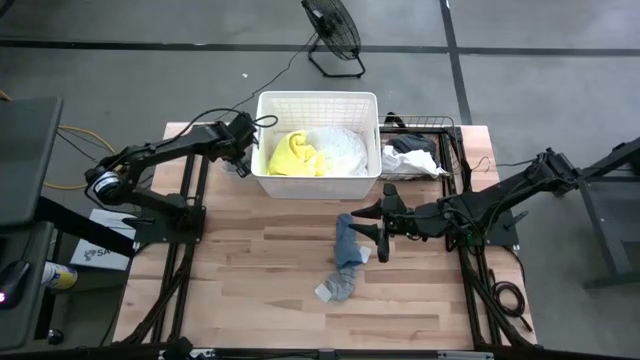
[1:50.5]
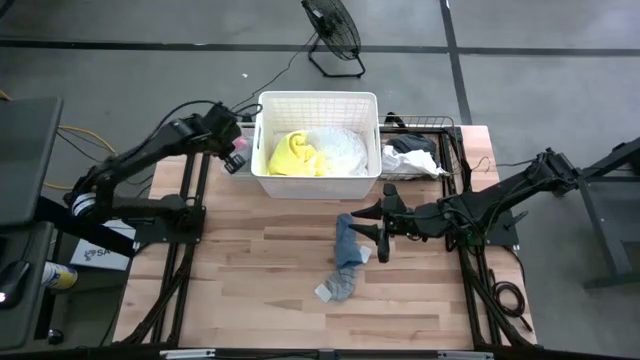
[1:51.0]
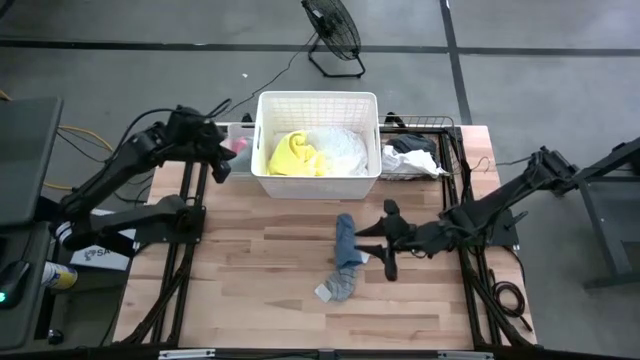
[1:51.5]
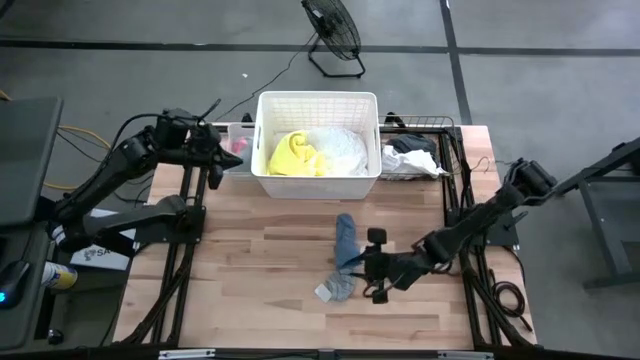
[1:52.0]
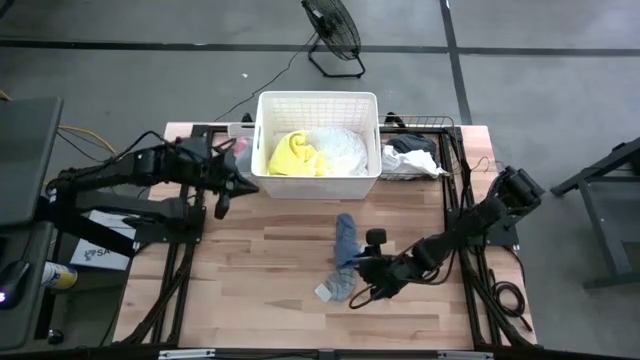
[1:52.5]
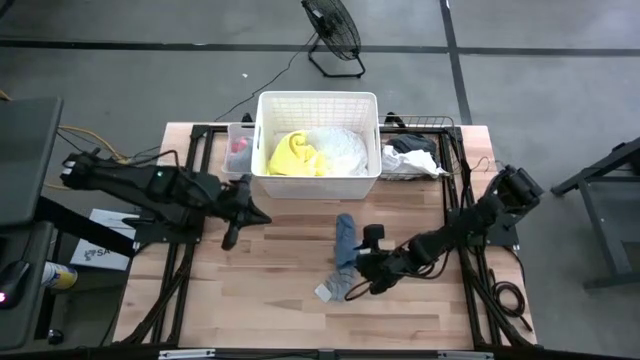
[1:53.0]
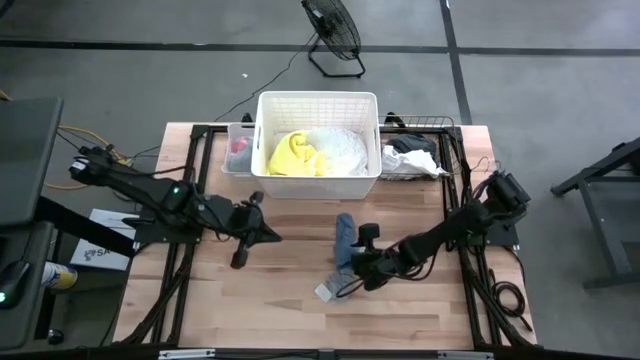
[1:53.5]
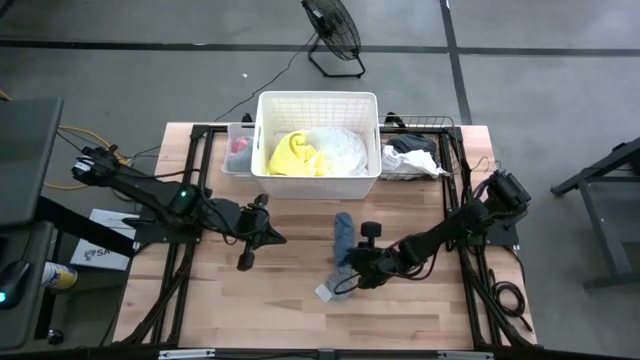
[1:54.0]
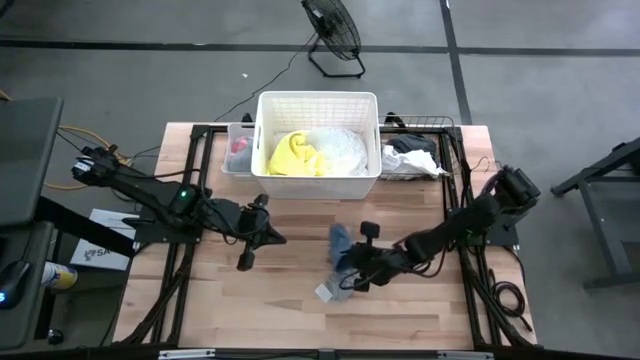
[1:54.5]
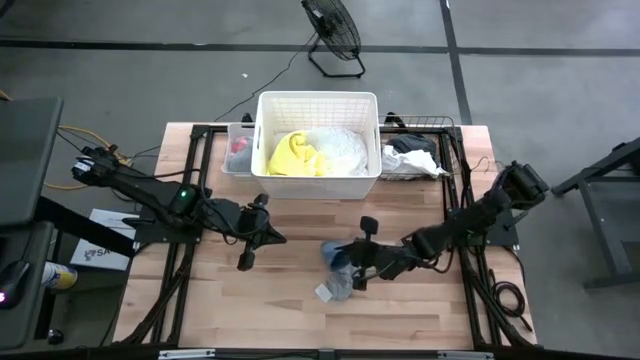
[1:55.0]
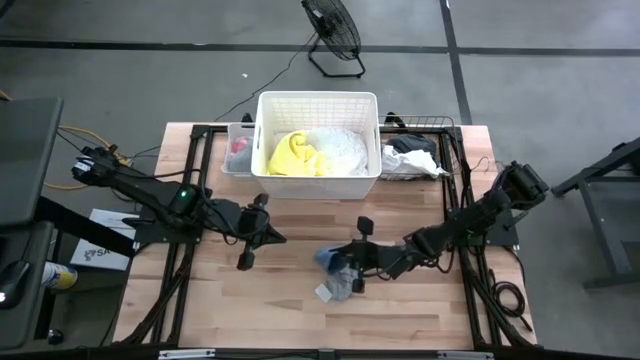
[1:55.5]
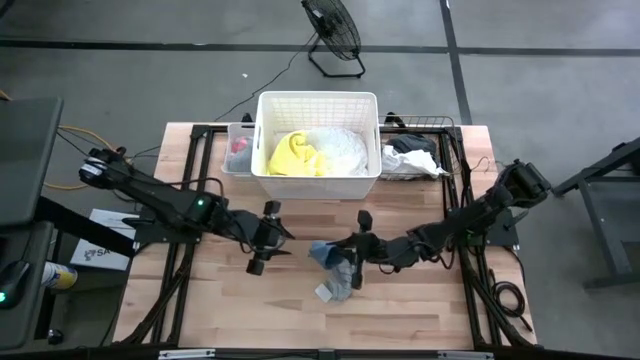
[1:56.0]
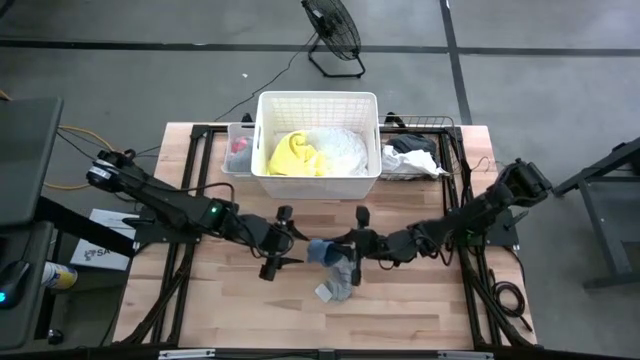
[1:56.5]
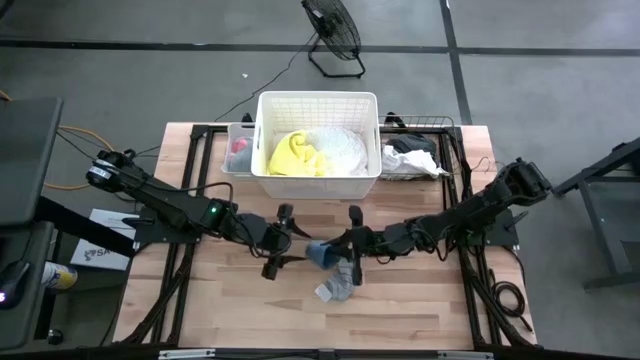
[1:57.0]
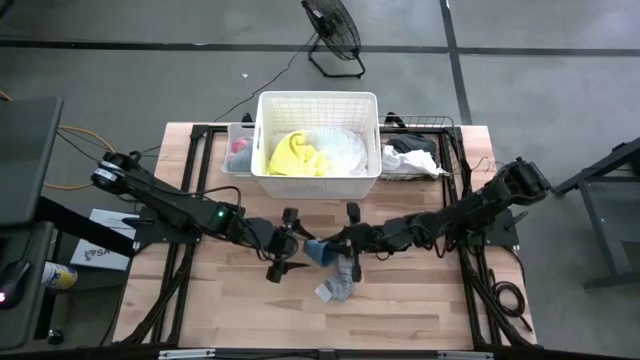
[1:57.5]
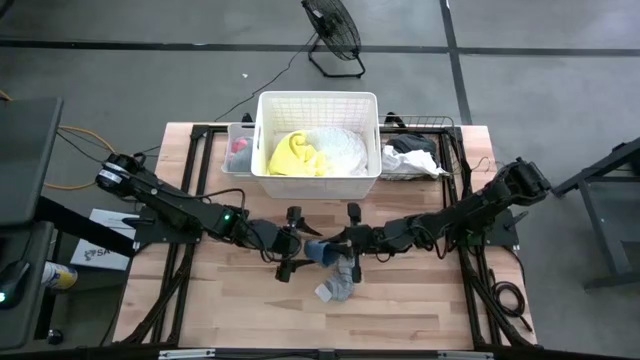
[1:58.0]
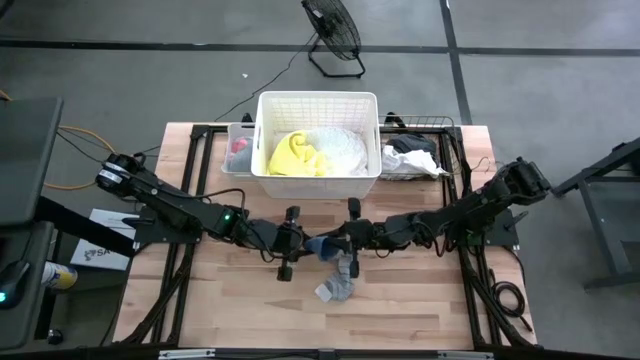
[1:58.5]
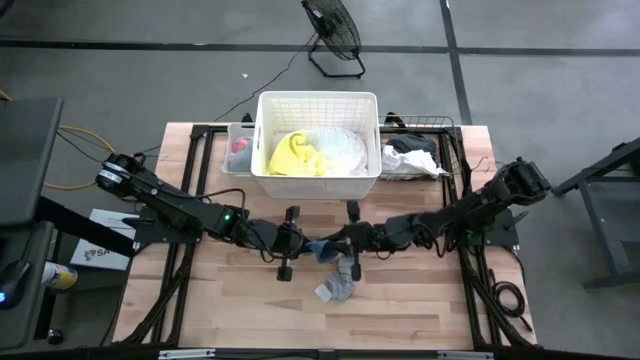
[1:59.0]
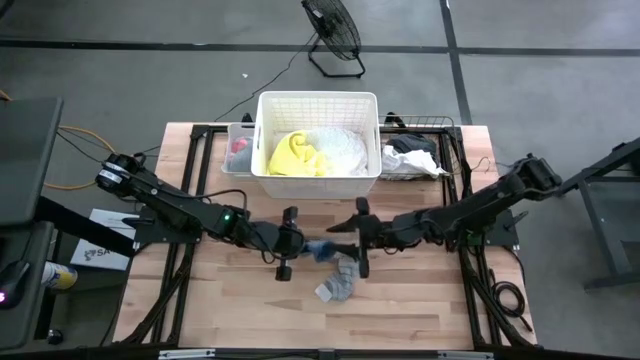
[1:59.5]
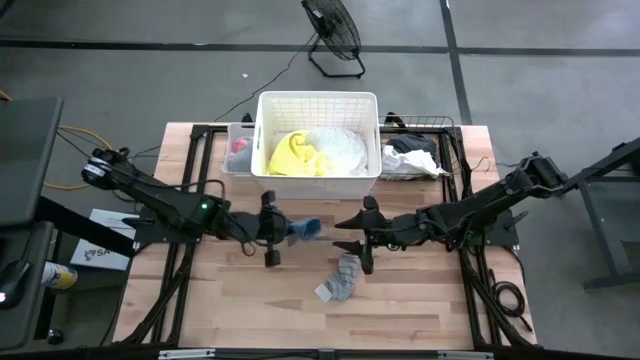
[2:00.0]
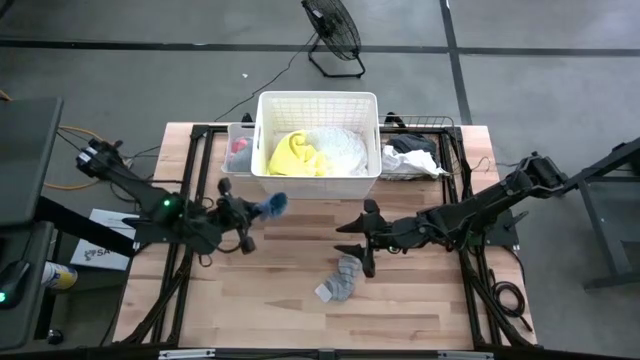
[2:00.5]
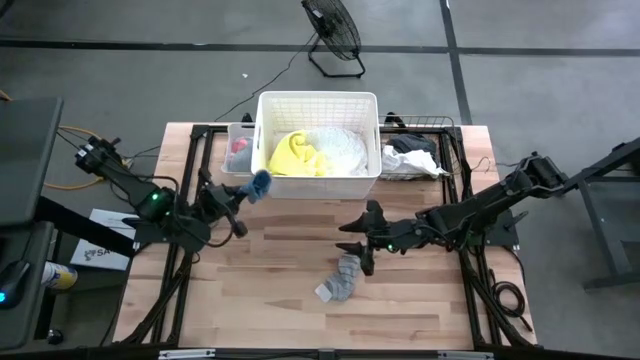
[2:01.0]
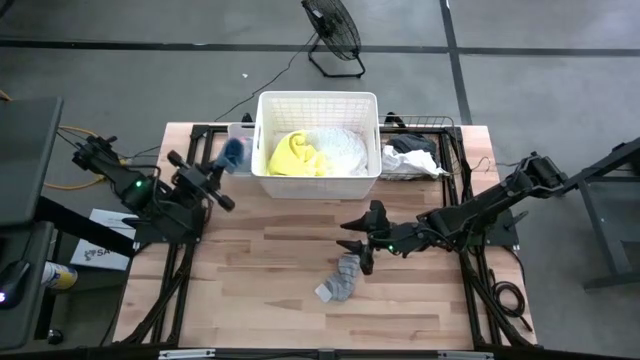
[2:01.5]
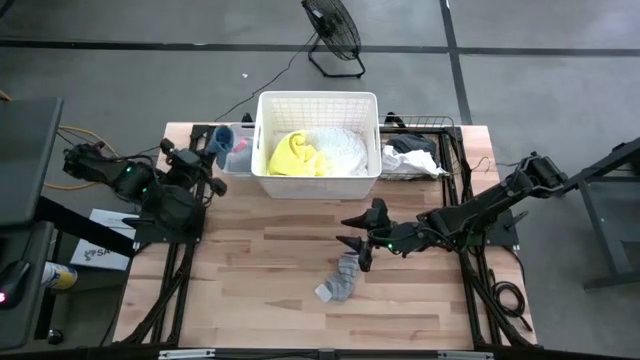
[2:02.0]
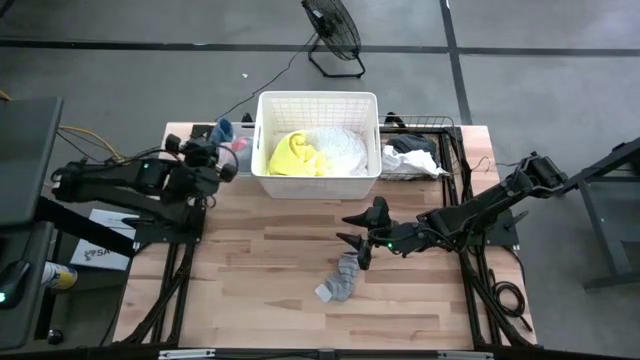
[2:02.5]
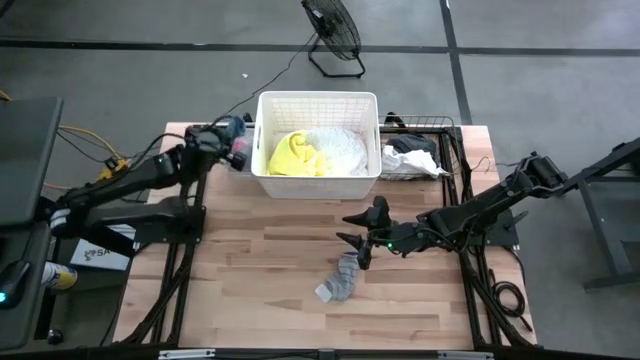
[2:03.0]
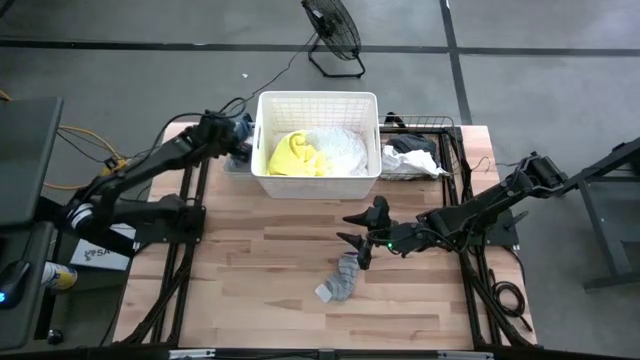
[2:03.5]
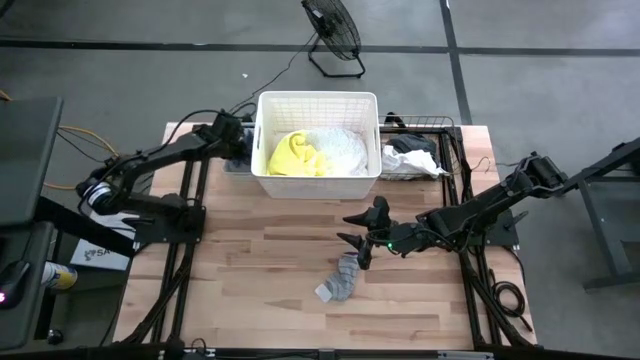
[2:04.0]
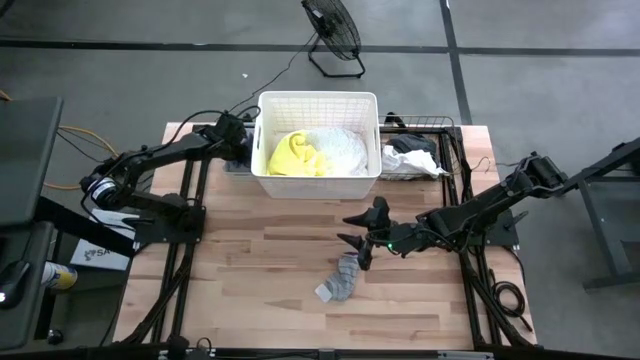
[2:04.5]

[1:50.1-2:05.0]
Task: Pick & Place Cloths
Put the blue sock into the white bin

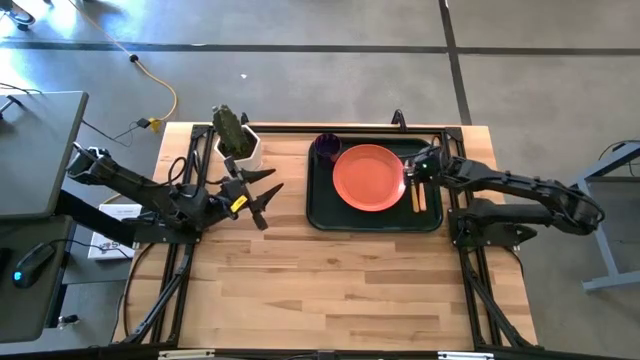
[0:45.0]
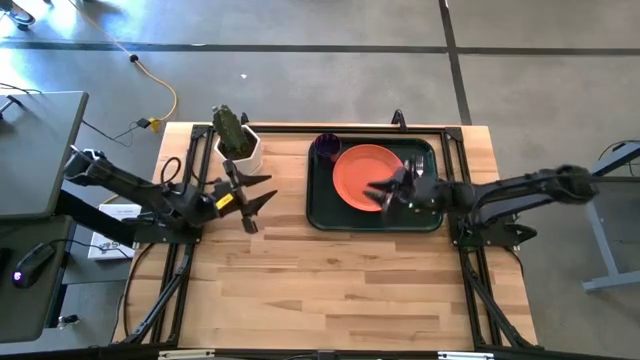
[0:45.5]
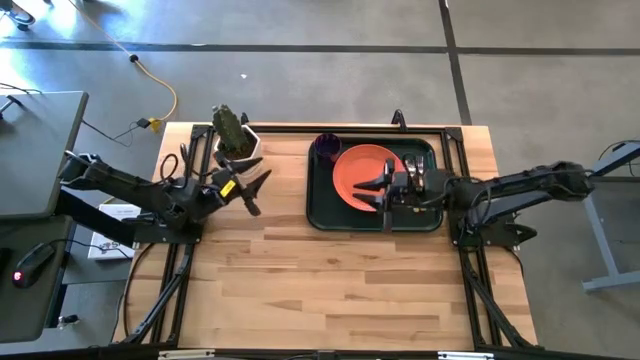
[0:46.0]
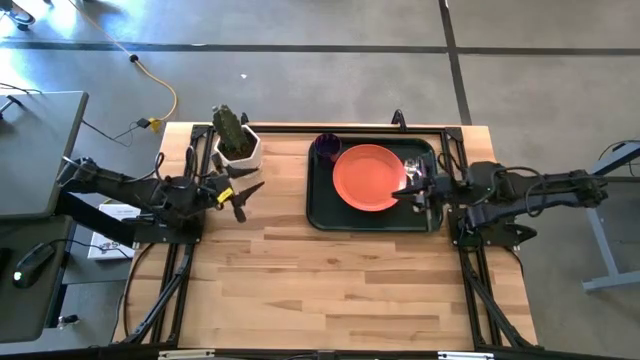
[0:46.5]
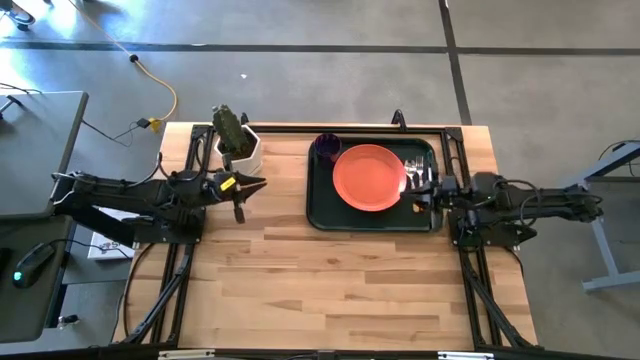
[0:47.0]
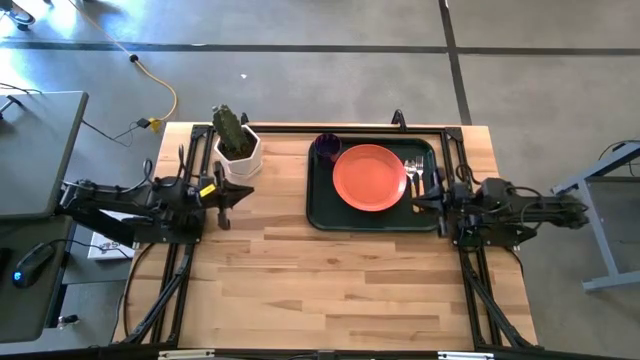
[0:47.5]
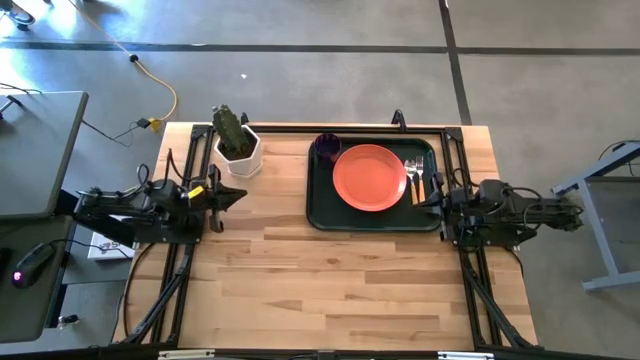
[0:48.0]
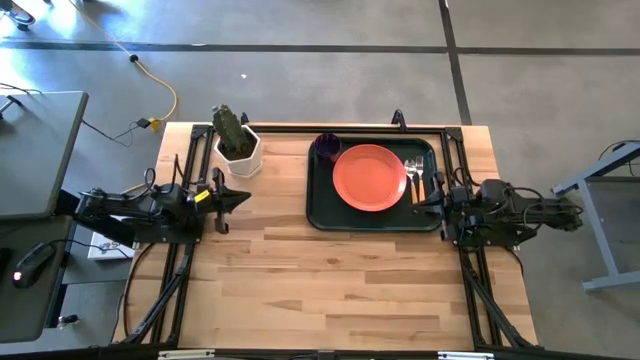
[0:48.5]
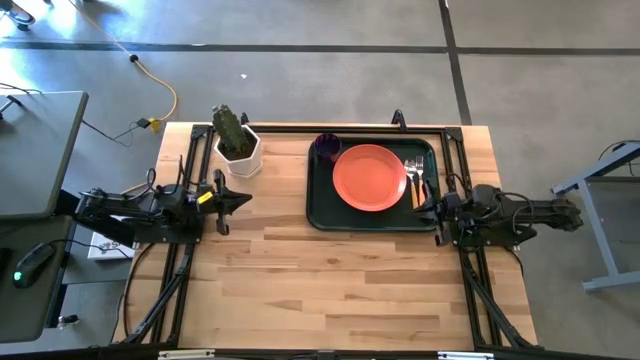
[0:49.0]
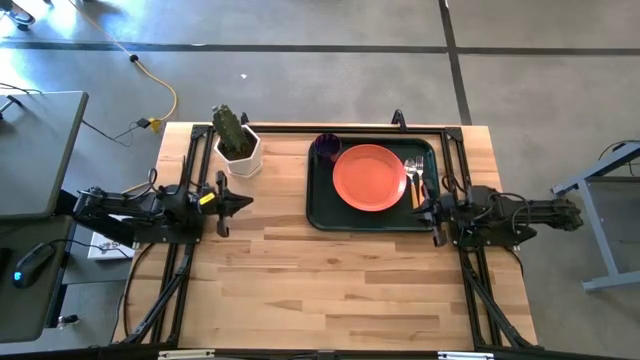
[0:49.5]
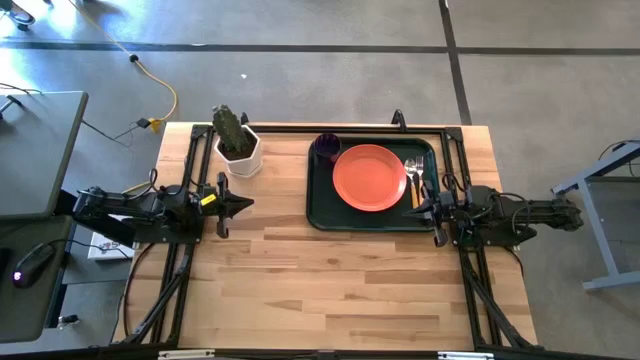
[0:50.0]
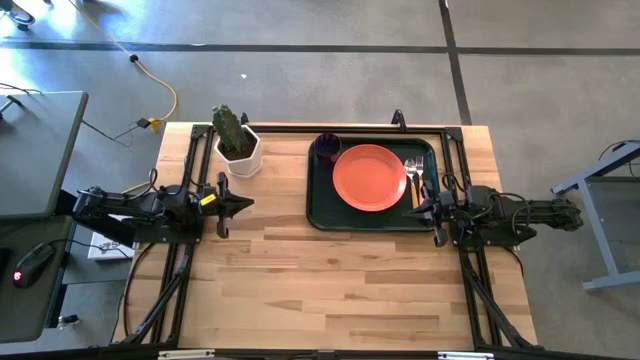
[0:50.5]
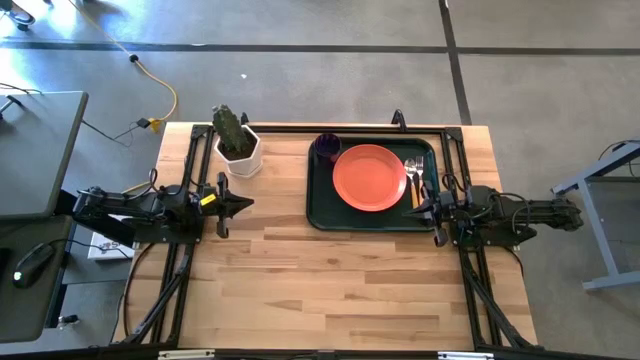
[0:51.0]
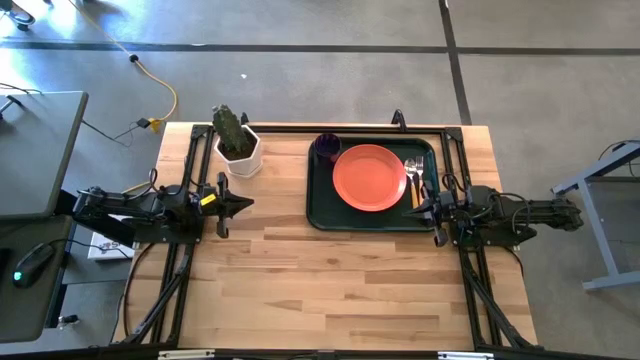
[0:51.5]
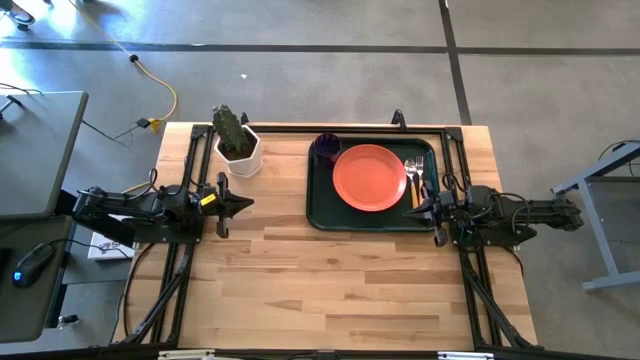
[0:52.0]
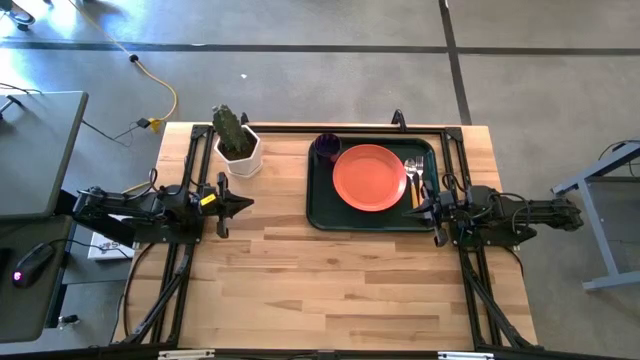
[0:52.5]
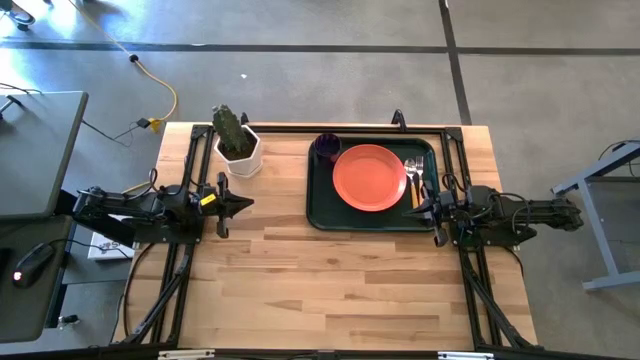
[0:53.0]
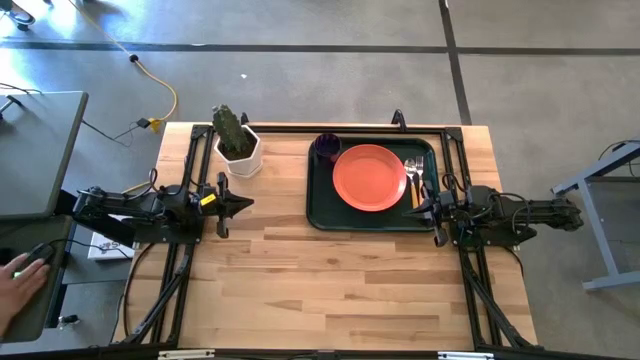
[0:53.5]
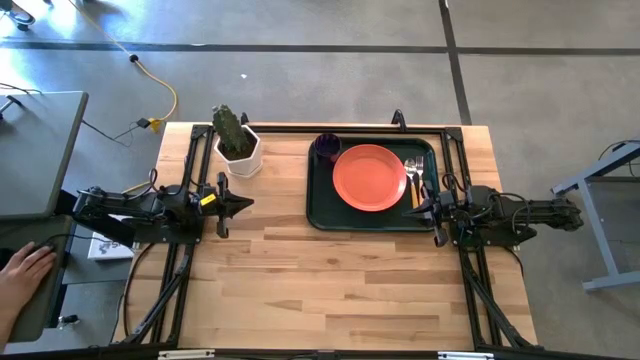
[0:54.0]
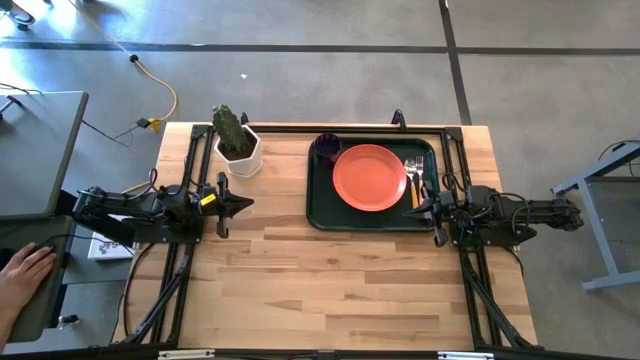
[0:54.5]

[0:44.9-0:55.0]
Task: Pick and place plate/cup/fork/spoon on tray
Return to Home Position
